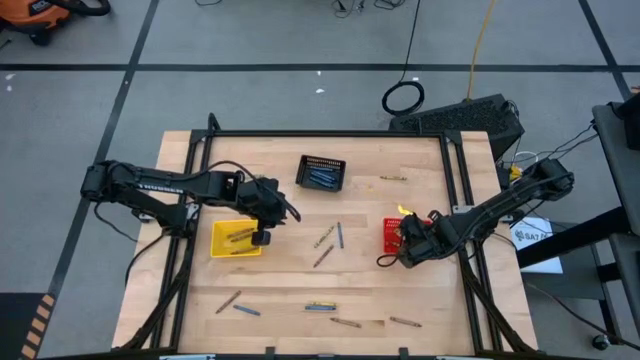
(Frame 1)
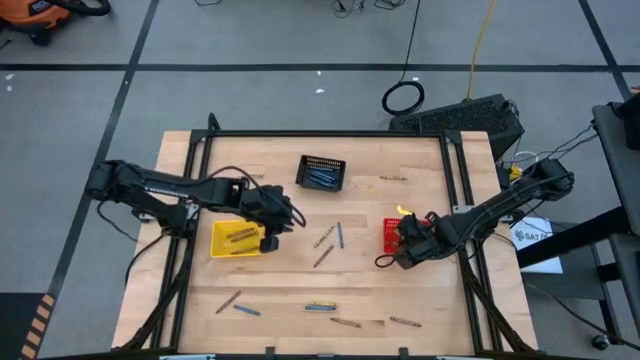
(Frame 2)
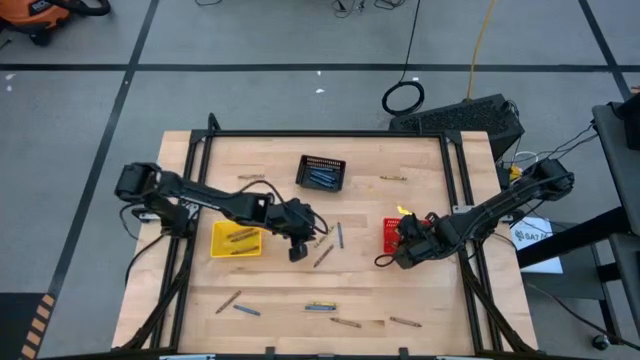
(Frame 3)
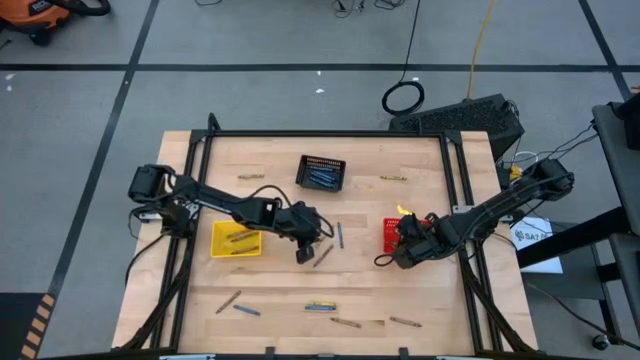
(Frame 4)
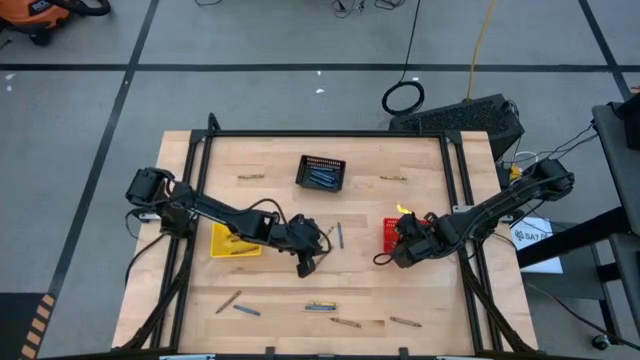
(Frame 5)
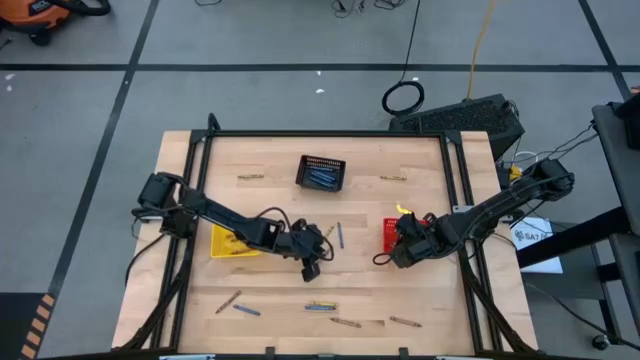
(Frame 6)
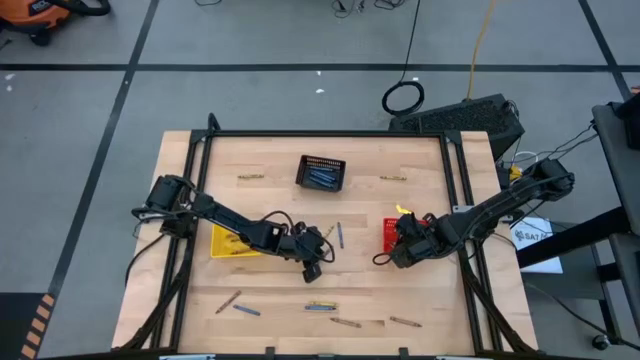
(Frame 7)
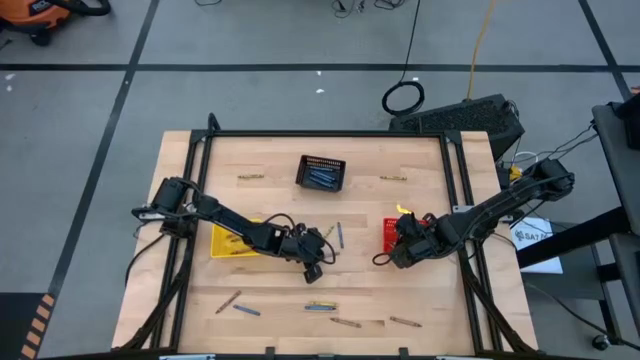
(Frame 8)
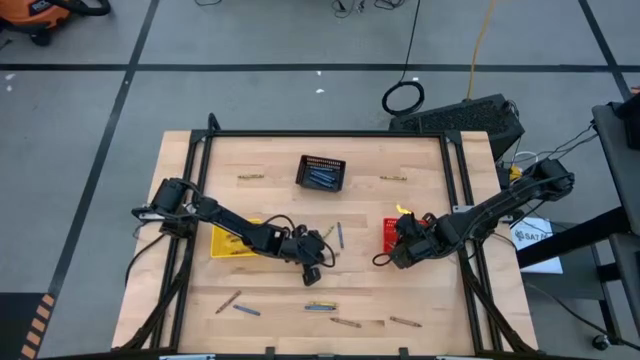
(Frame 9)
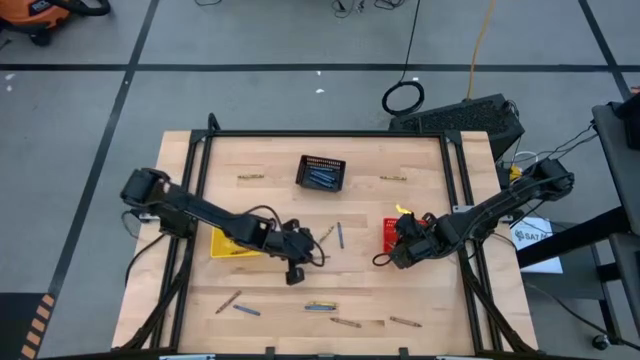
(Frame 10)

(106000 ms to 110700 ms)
Task: Sort crayons
Put the brown crayon into the yellow bin

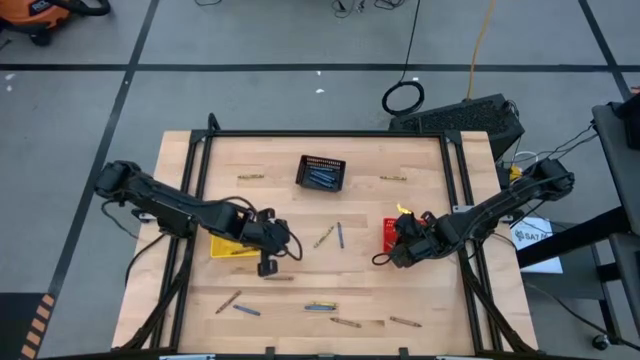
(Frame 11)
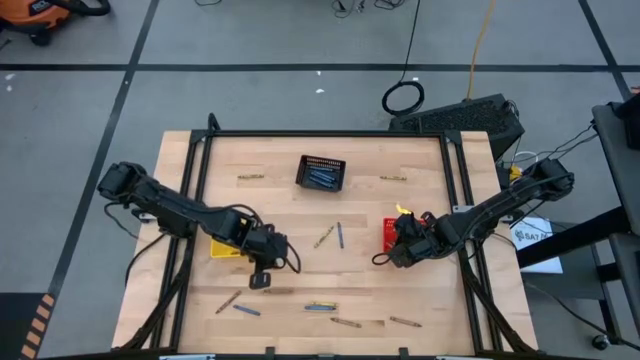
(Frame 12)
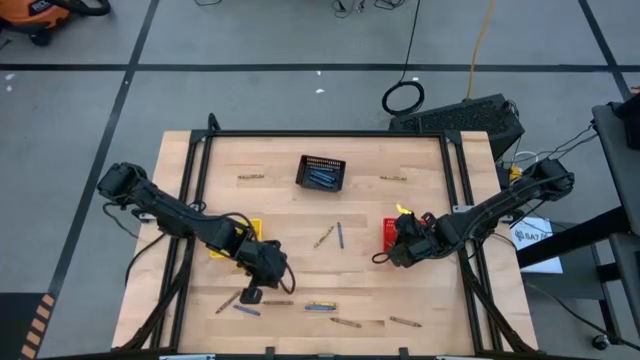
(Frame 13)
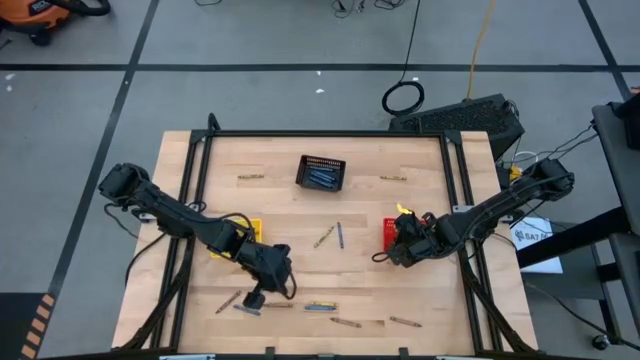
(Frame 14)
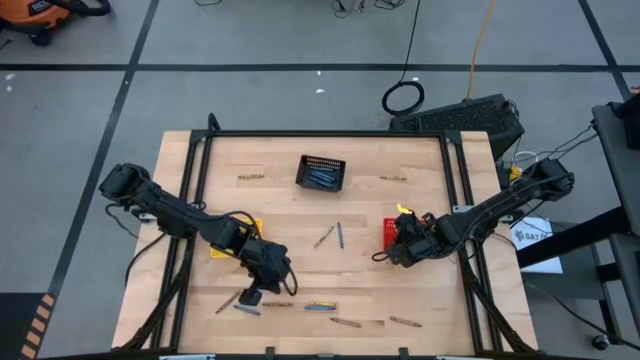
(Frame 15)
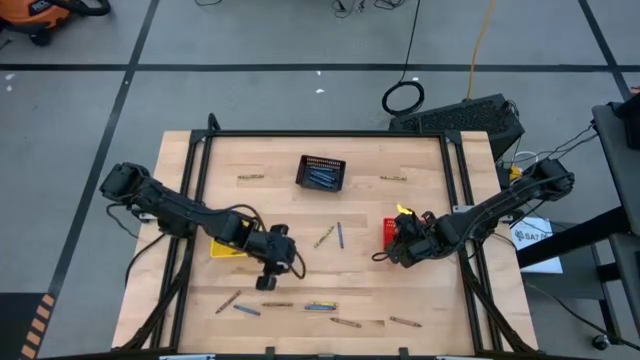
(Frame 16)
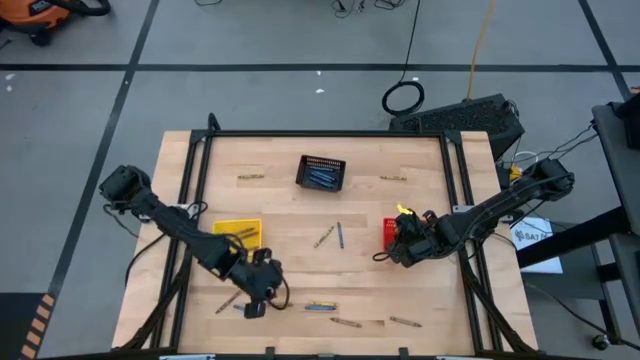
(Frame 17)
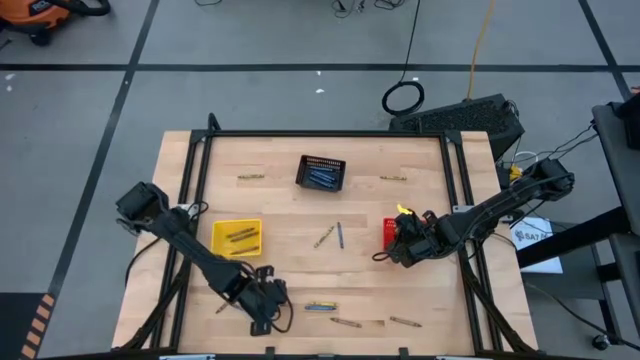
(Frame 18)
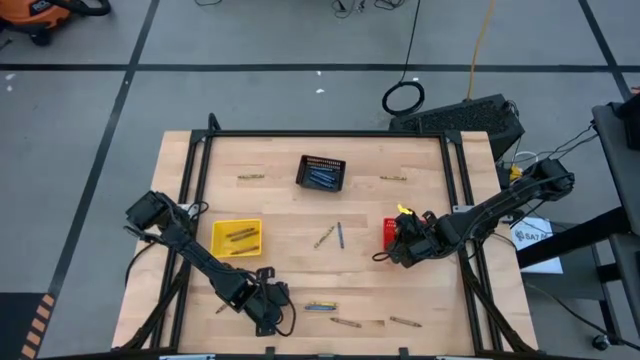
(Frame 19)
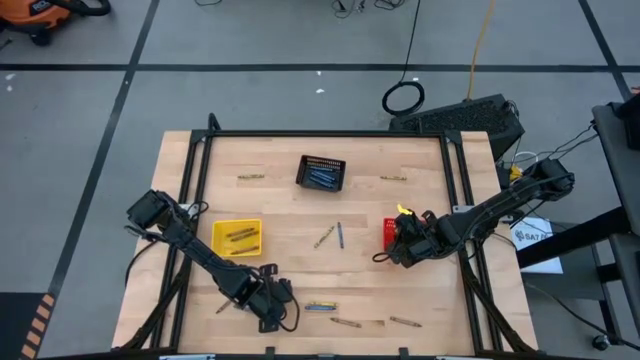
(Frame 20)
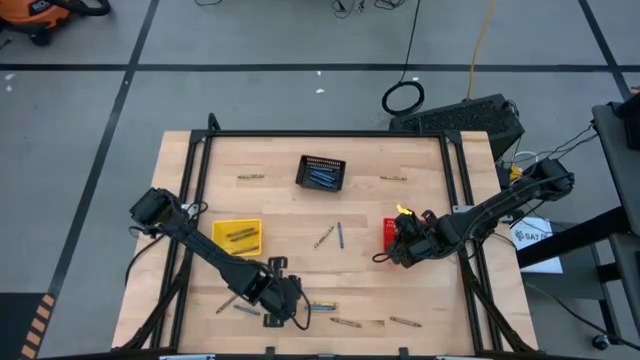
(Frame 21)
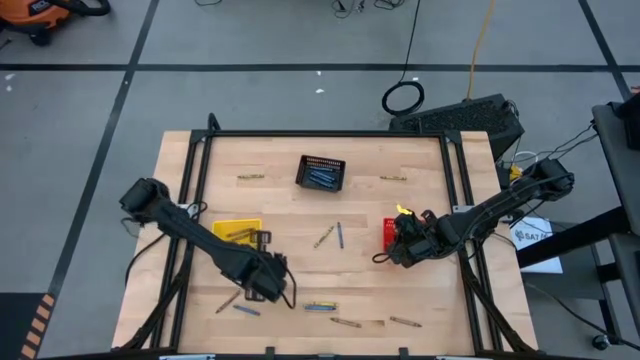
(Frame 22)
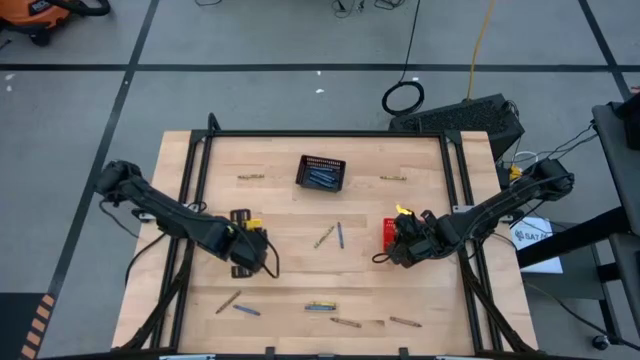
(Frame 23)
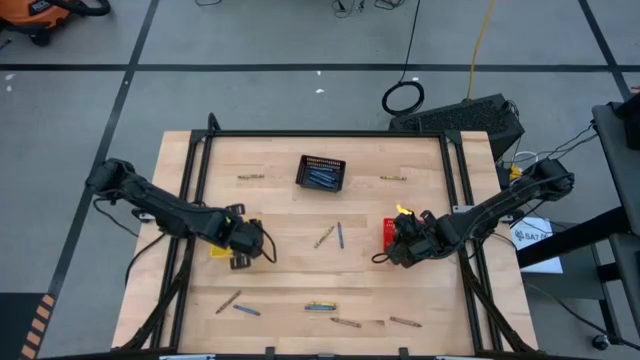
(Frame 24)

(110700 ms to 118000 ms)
Put the brown crayon into the yellow bin

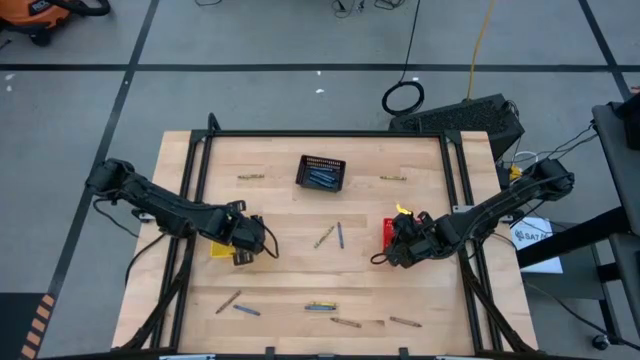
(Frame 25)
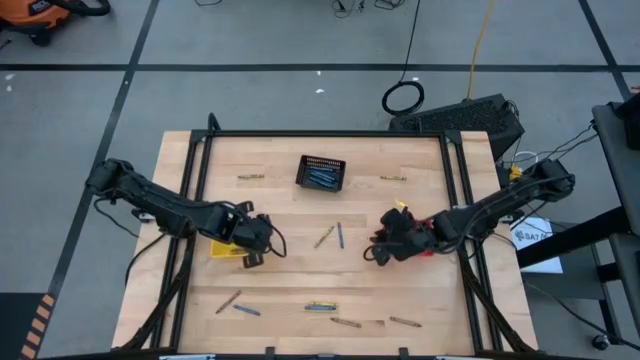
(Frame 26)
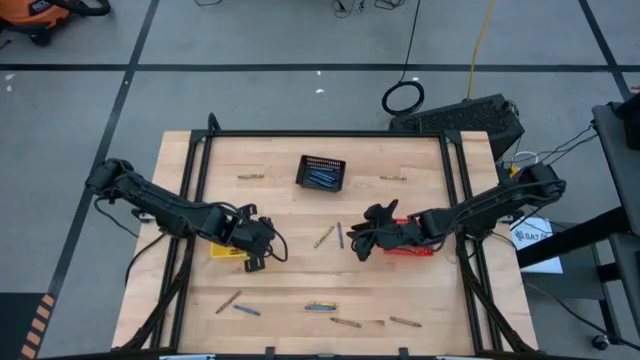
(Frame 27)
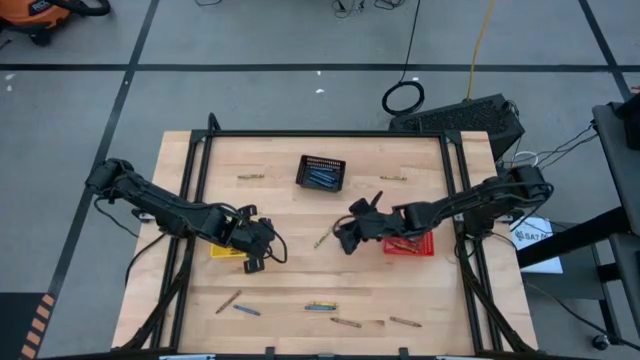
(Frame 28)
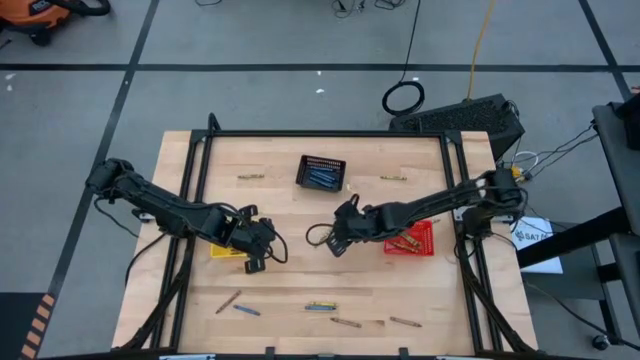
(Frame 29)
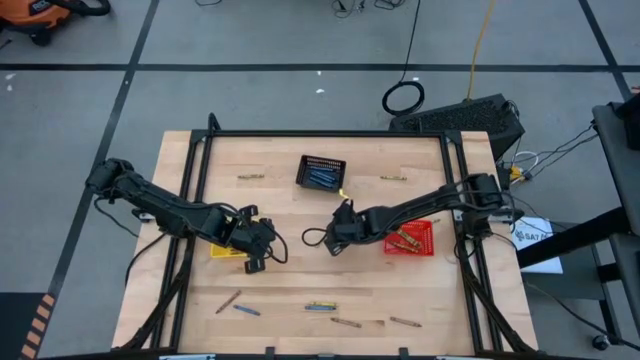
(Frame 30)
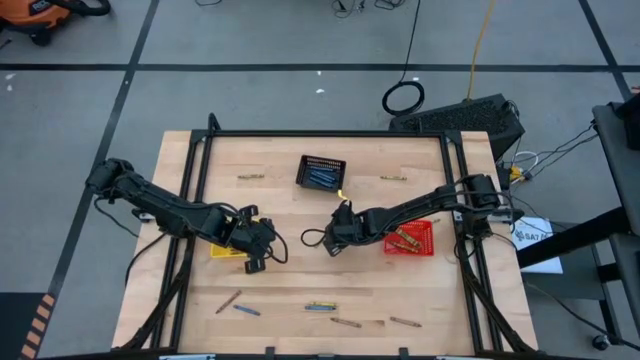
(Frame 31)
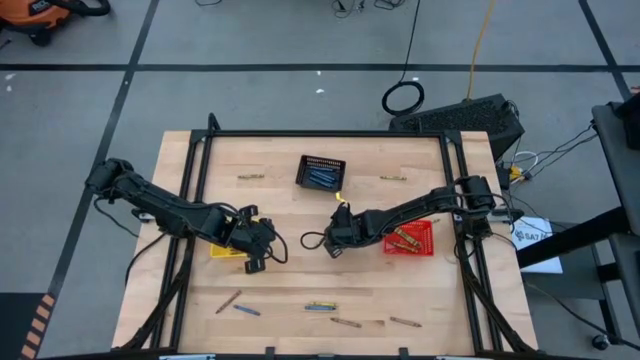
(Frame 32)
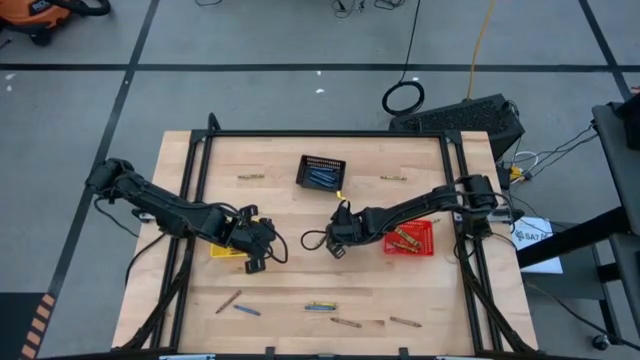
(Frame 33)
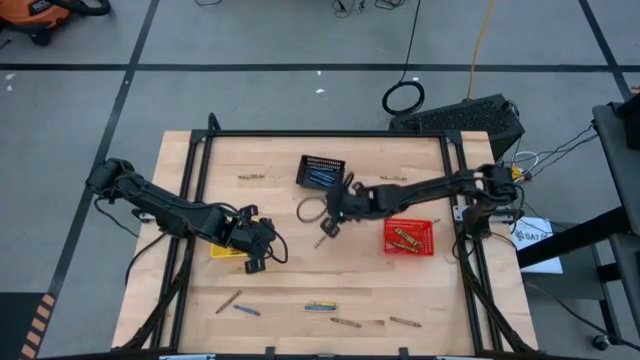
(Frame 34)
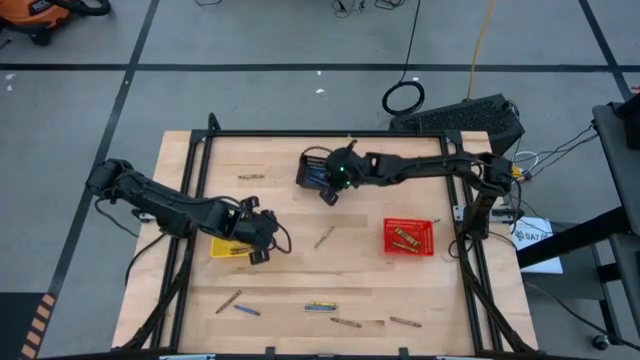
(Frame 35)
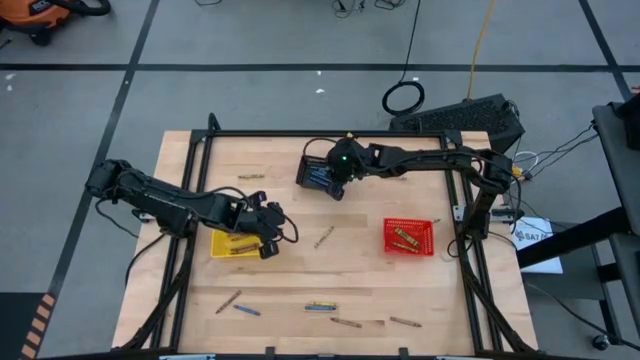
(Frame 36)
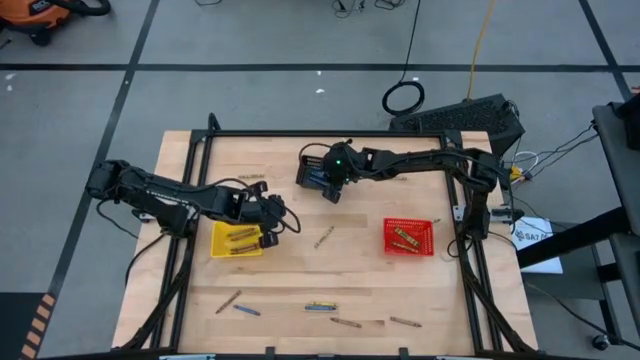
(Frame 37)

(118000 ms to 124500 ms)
Put the blue crayon into the black bin

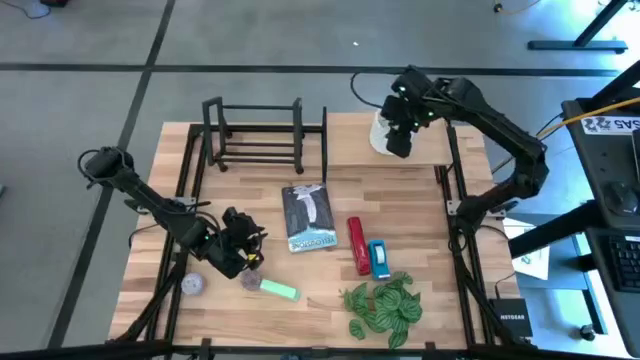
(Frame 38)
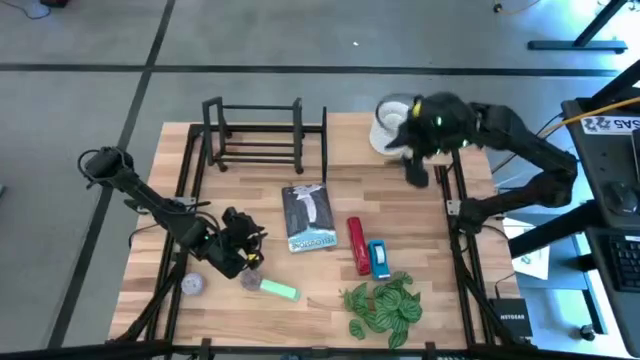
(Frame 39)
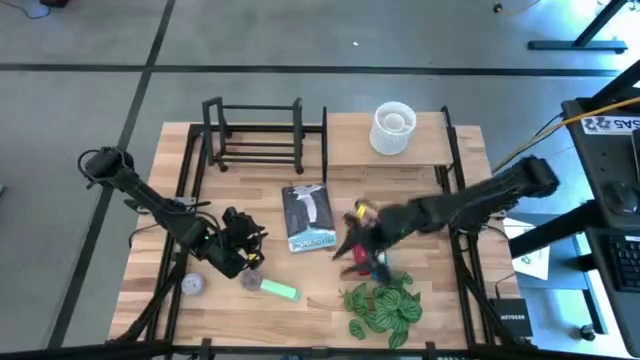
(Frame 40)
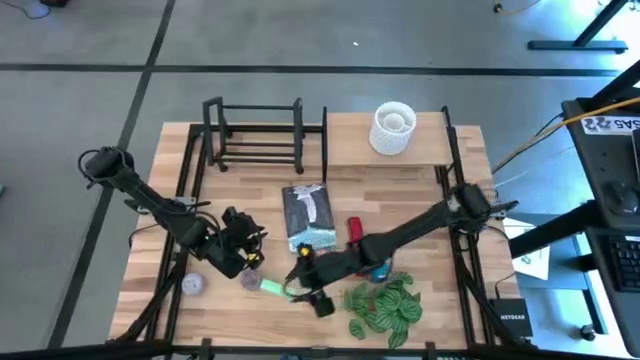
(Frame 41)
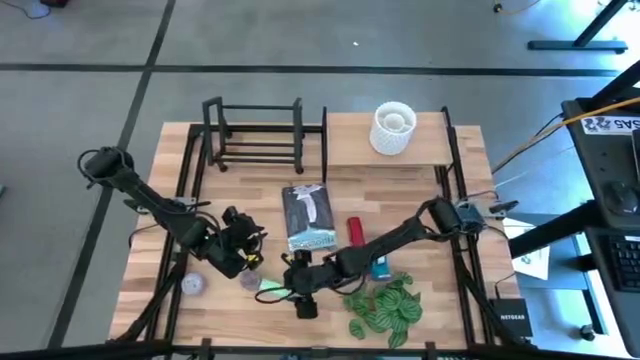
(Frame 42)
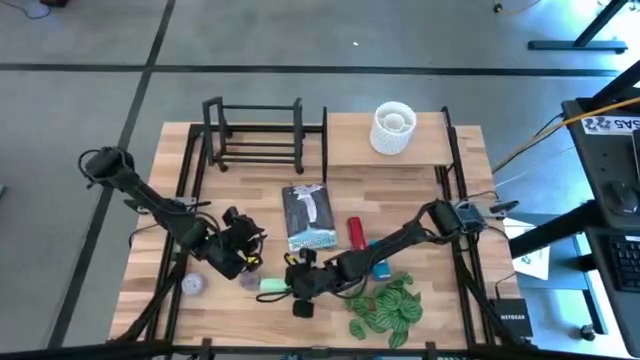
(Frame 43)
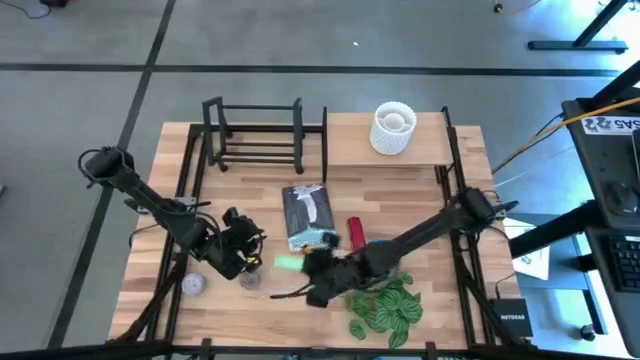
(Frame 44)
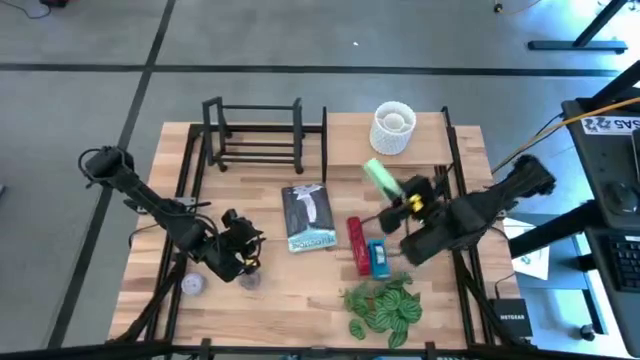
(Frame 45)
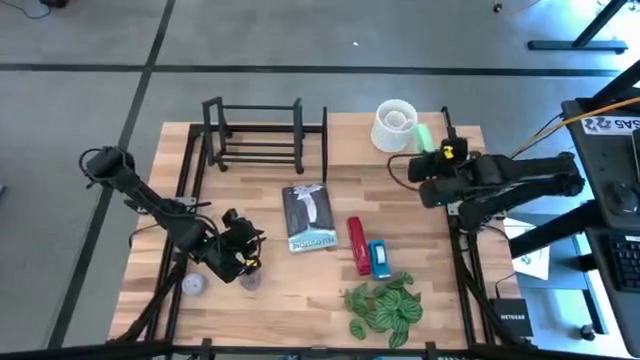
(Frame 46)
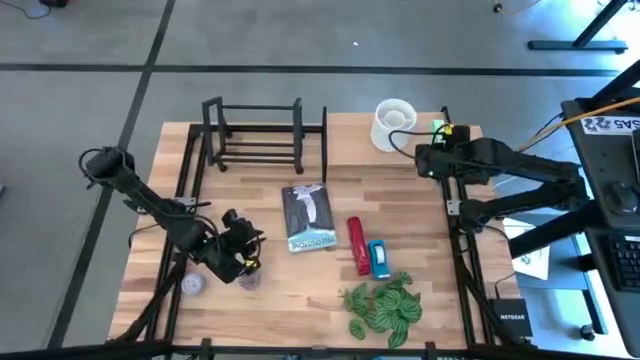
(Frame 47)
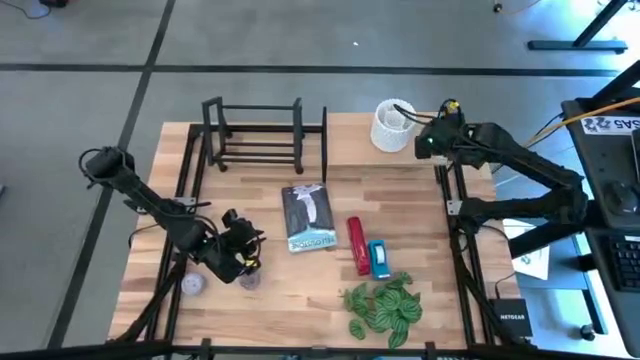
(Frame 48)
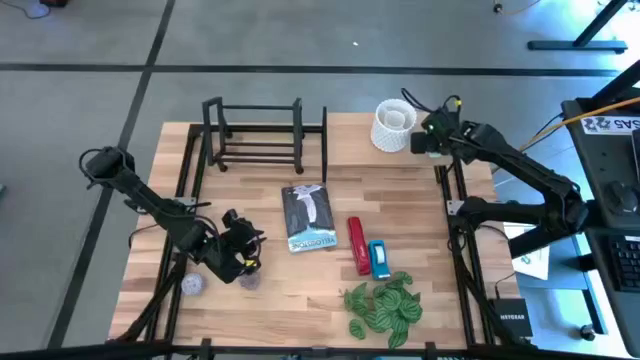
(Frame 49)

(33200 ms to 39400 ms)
Task: Stock shelves
Put the green stapler on the shelf
